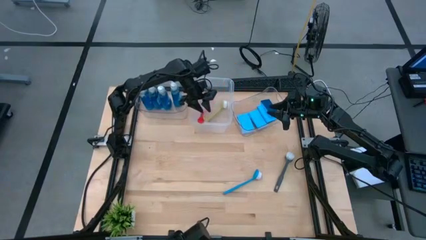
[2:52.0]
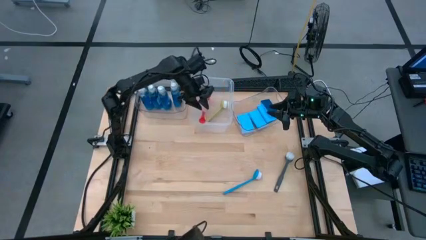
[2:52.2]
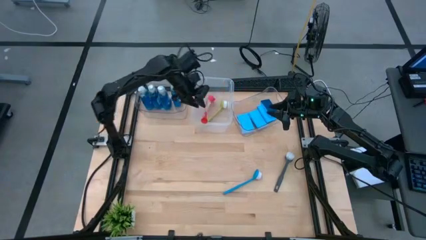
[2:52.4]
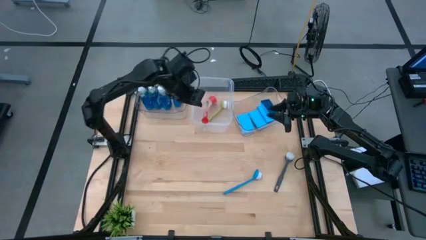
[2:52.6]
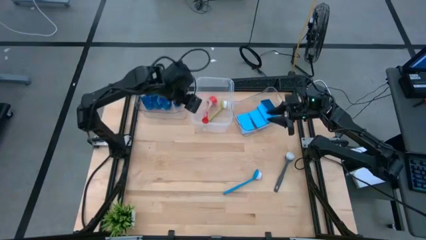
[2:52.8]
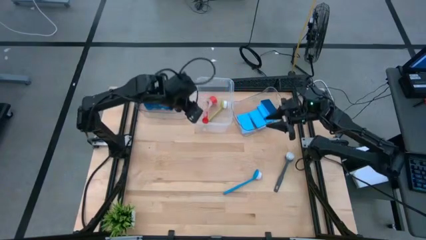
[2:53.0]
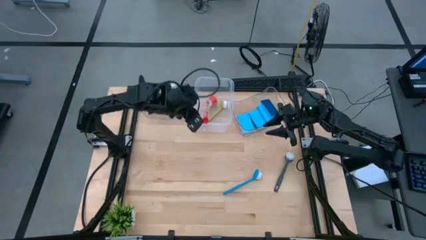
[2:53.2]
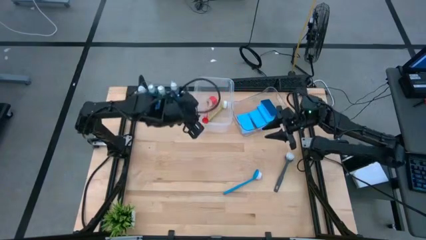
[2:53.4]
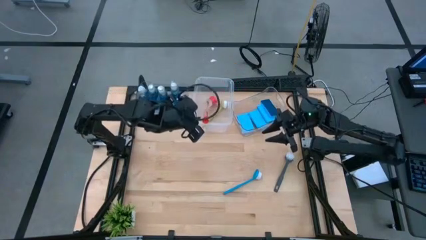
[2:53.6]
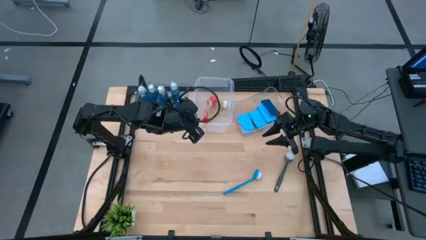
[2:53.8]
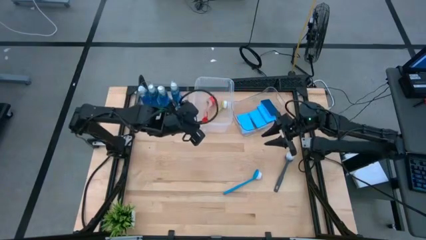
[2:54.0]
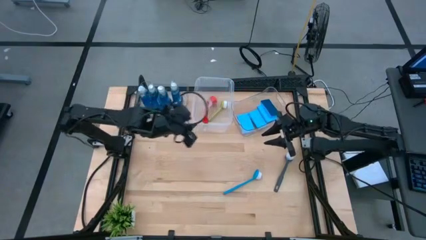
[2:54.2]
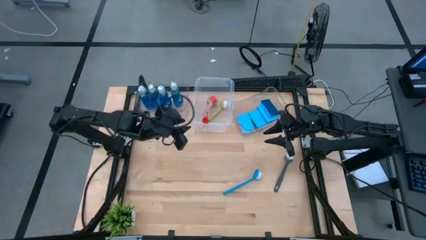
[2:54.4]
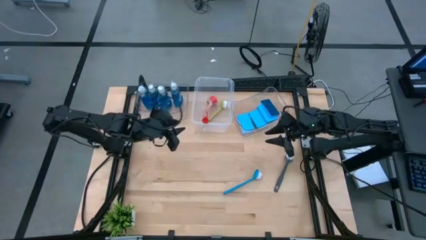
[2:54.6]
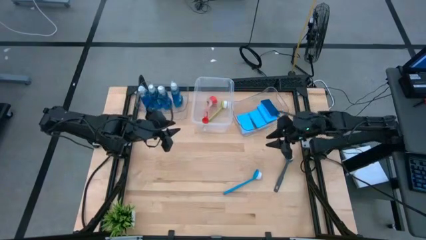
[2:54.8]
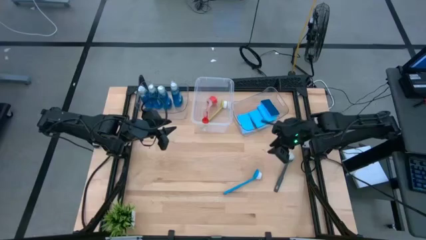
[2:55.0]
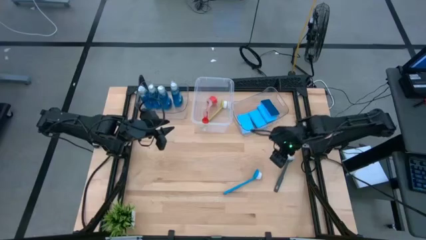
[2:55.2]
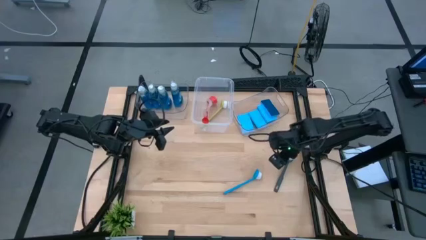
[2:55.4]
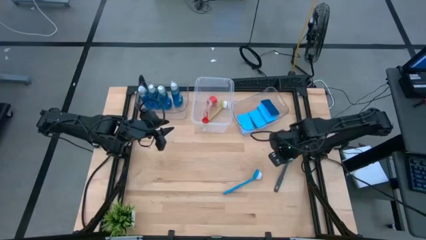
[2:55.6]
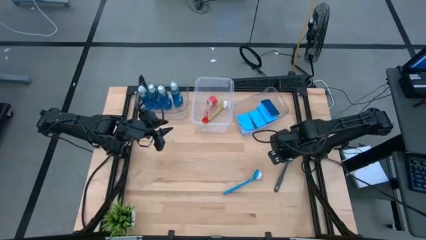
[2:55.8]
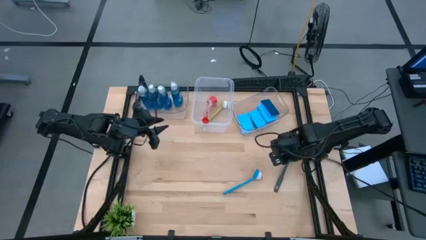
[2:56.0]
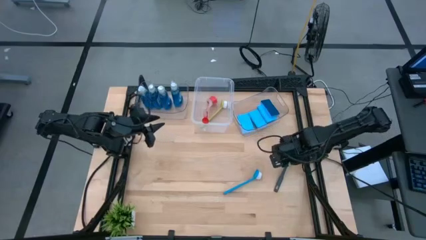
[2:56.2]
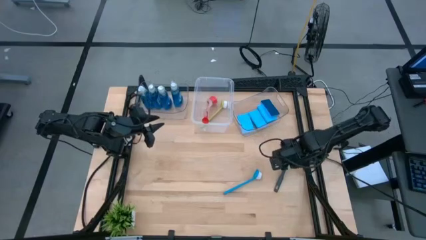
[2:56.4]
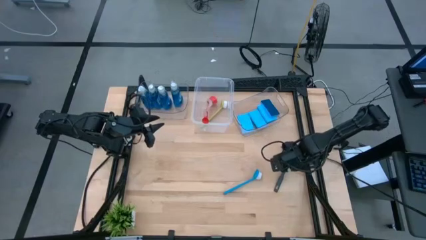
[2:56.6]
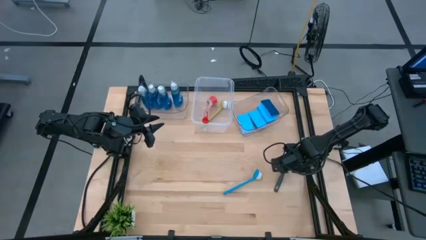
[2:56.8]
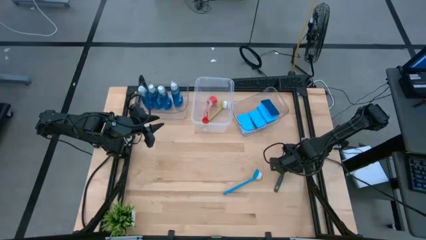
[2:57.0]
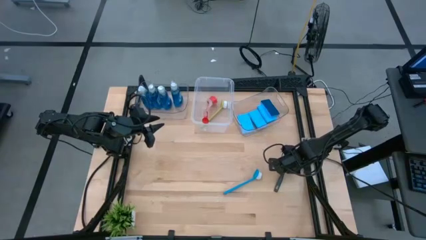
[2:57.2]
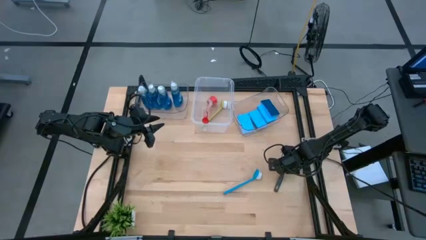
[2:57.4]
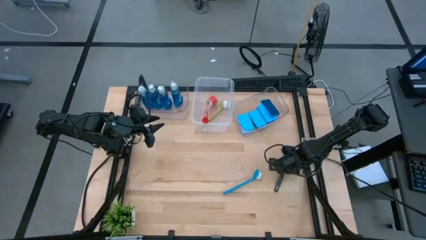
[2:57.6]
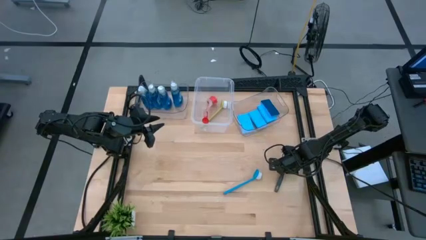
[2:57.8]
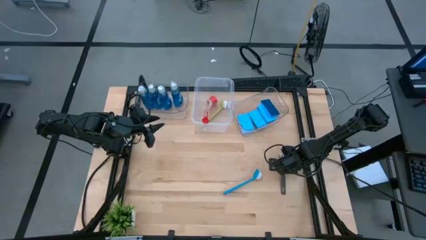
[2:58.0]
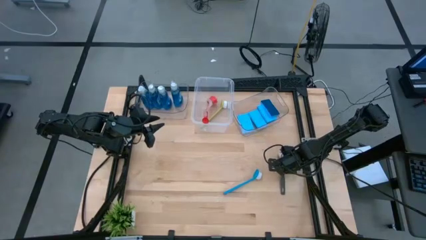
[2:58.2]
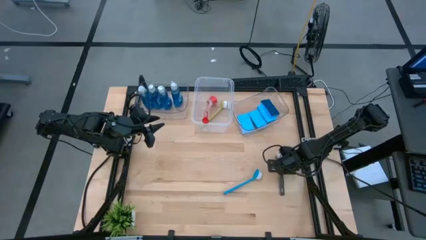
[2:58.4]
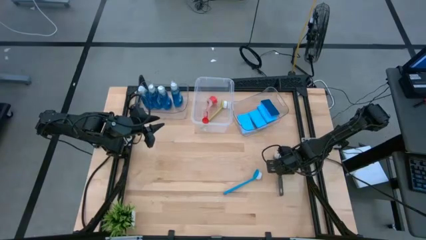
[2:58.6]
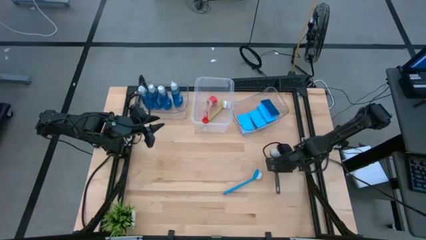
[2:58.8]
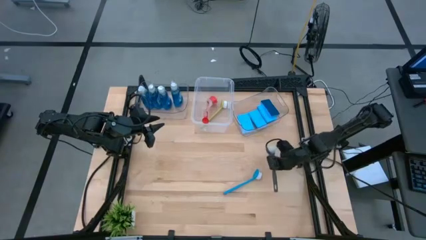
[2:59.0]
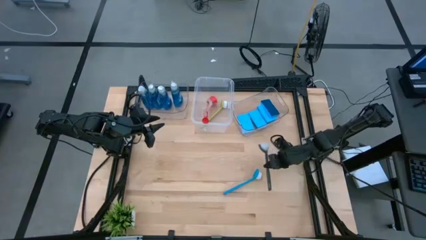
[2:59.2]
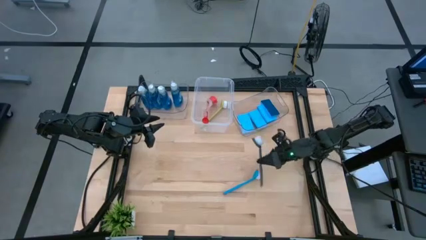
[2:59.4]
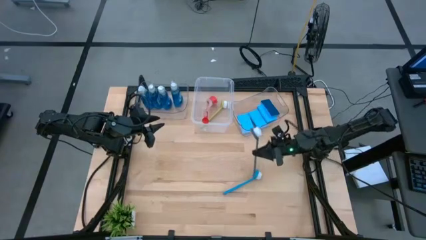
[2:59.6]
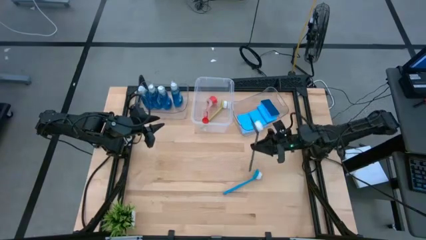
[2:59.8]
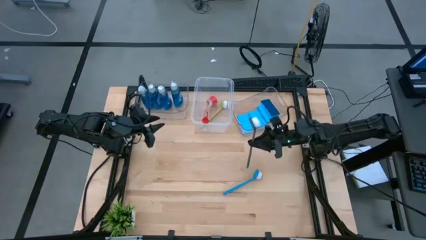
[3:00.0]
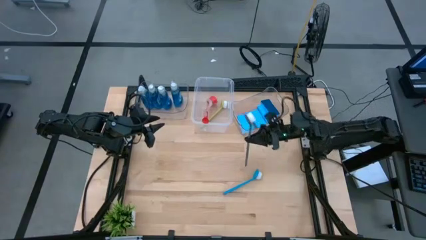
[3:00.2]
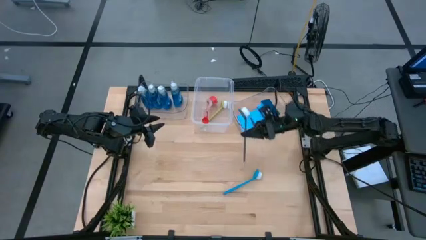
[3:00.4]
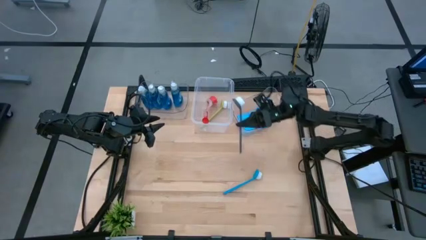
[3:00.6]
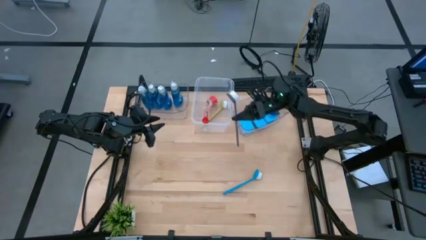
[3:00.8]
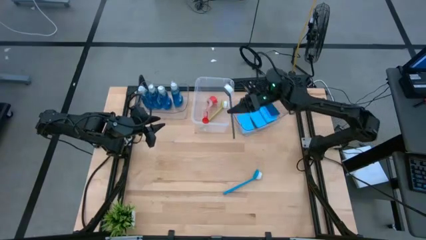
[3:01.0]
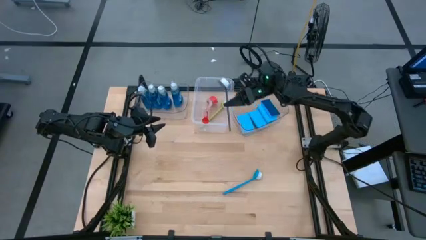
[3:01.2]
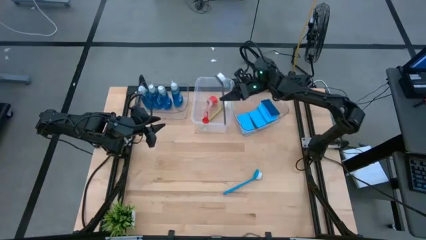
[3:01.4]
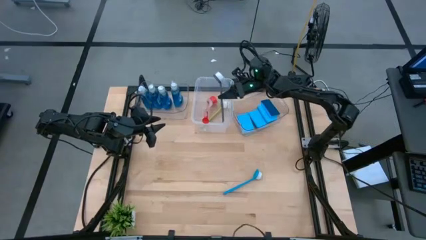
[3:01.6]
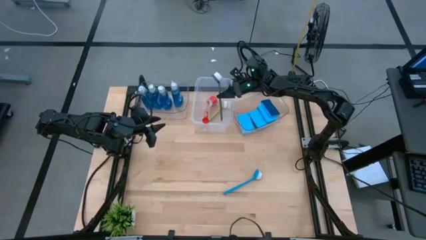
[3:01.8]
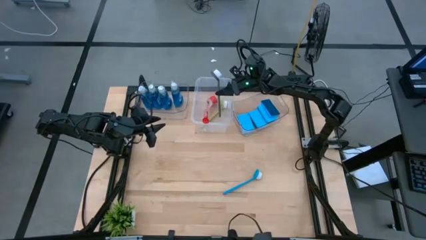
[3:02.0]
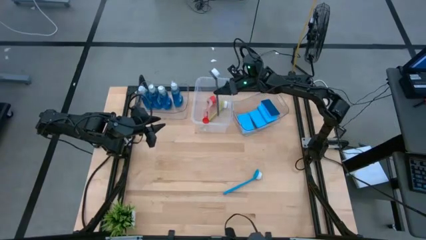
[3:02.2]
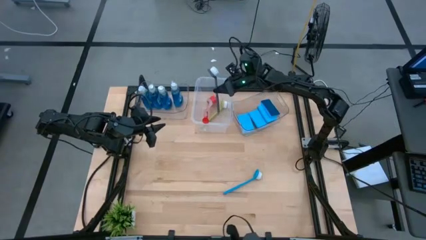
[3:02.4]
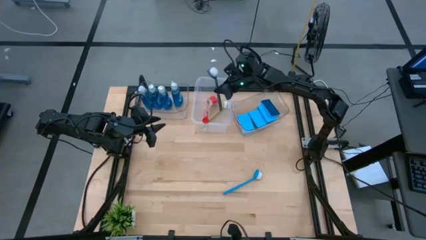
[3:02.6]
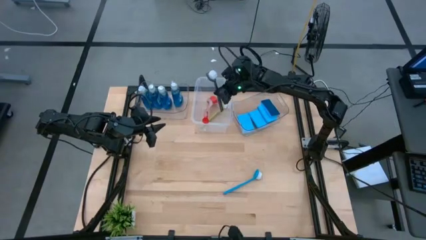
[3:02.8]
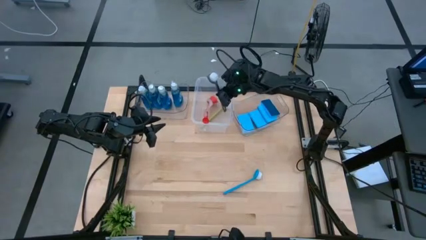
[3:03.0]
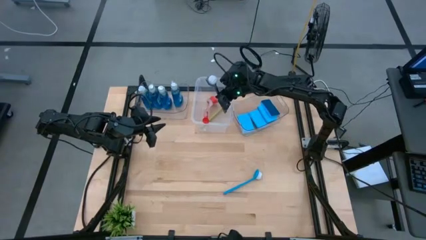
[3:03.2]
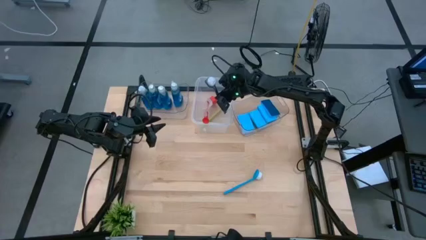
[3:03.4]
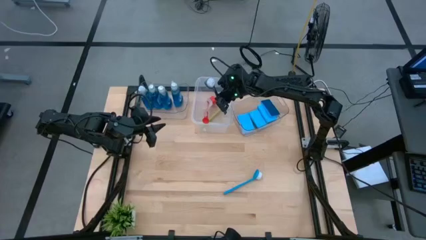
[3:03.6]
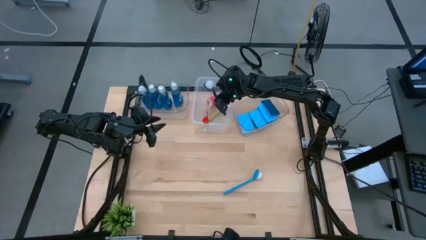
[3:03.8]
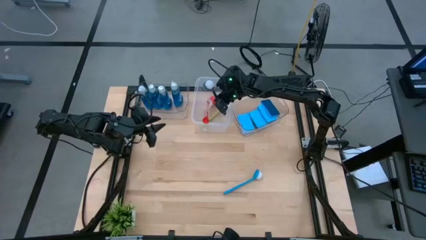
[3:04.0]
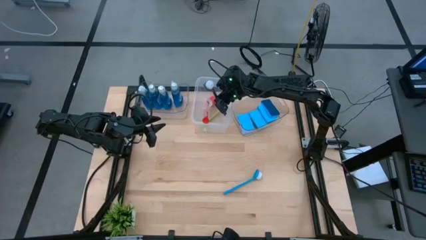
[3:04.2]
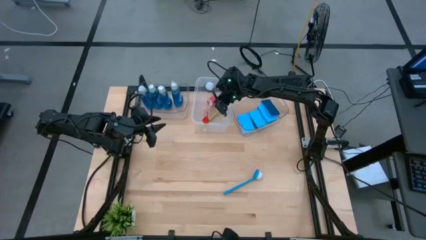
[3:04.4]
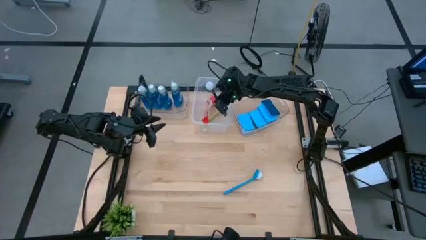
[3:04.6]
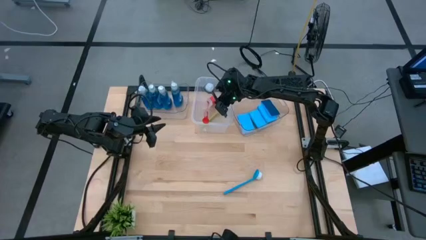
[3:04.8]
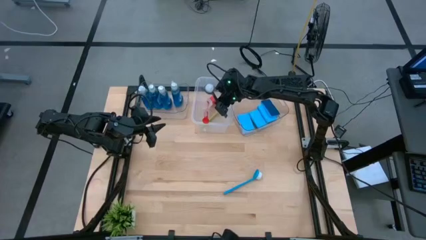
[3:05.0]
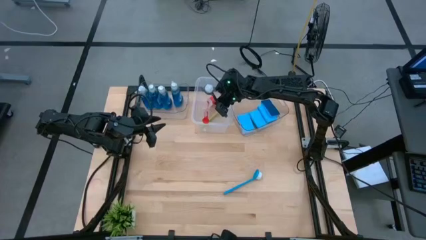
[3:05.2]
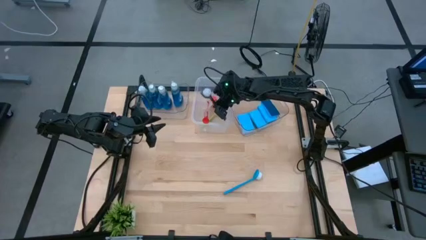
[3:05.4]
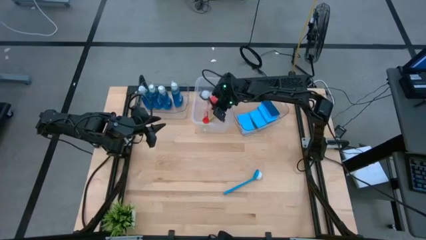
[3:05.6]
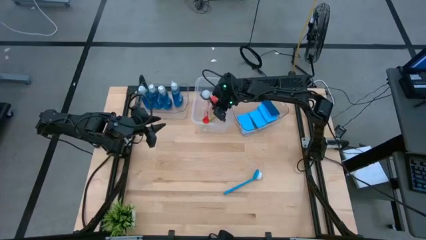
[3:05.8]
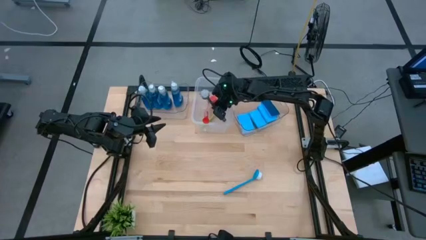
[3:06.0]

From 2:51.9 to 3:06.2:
Task: Pick & Place Kitchen Sink Supplies
Put the gray dish brush into the large transparent bin

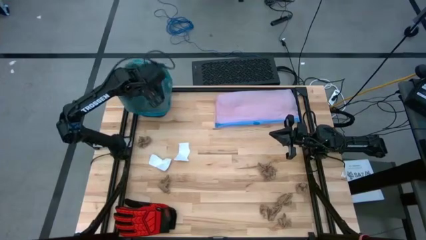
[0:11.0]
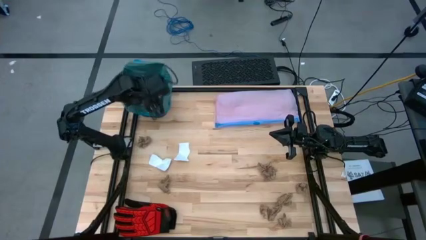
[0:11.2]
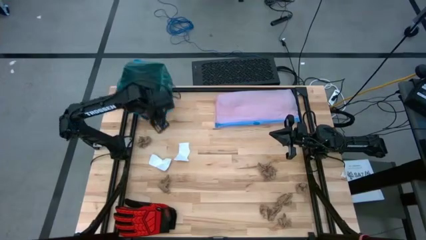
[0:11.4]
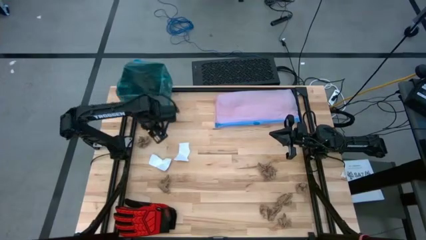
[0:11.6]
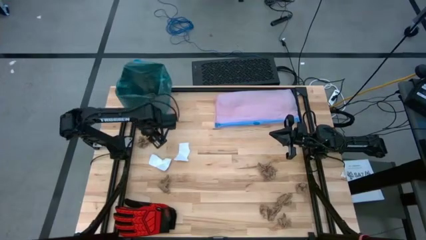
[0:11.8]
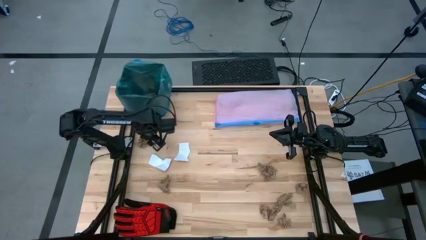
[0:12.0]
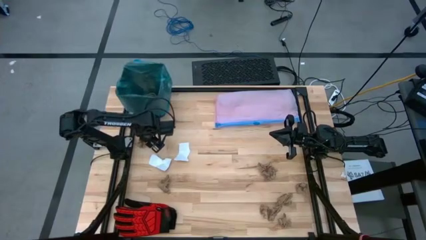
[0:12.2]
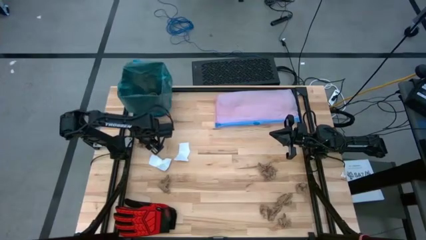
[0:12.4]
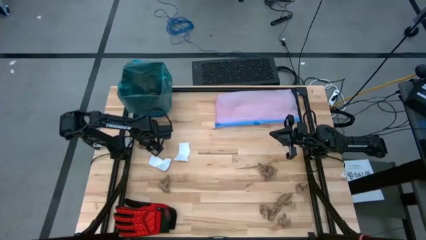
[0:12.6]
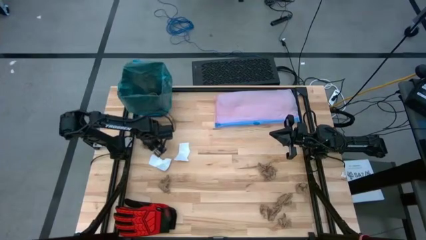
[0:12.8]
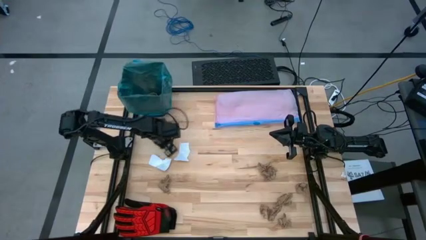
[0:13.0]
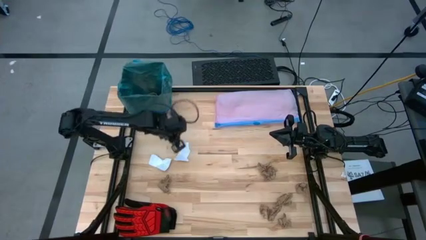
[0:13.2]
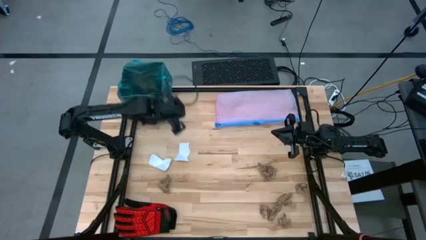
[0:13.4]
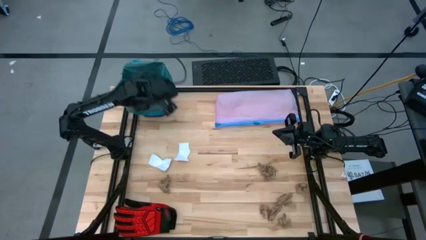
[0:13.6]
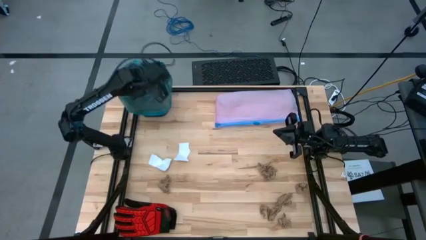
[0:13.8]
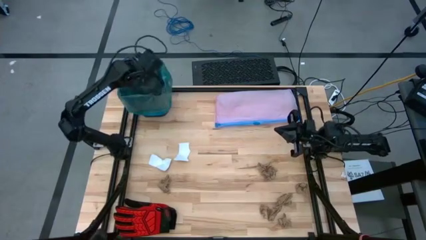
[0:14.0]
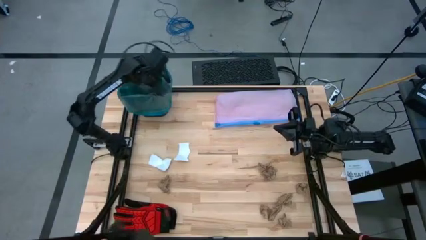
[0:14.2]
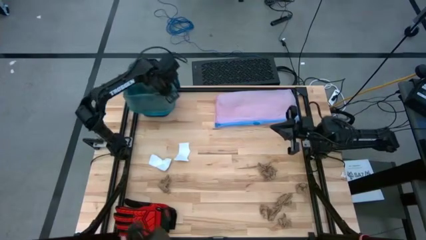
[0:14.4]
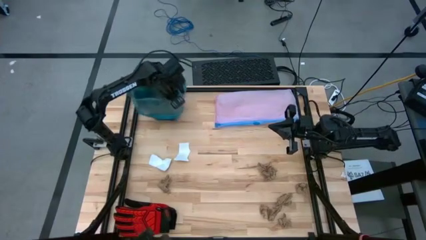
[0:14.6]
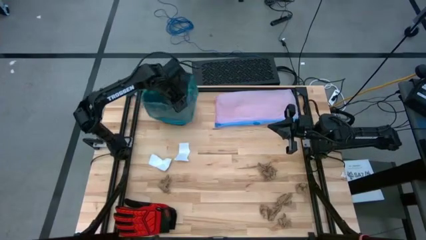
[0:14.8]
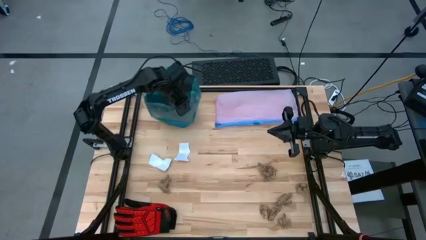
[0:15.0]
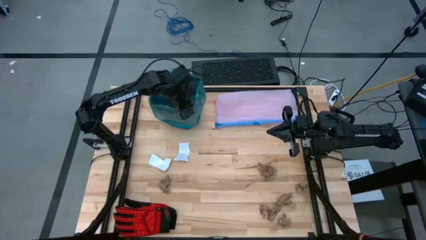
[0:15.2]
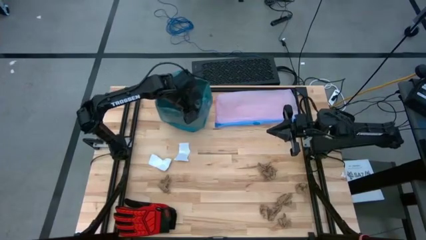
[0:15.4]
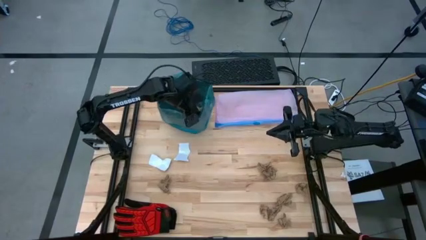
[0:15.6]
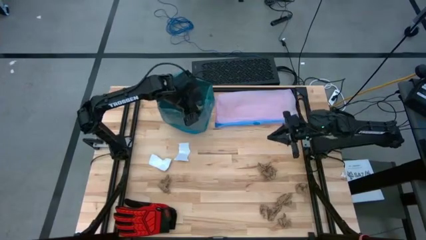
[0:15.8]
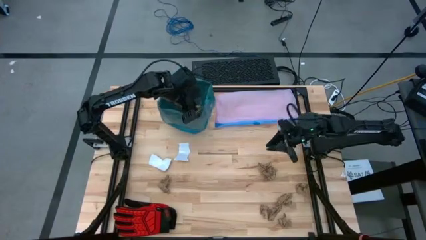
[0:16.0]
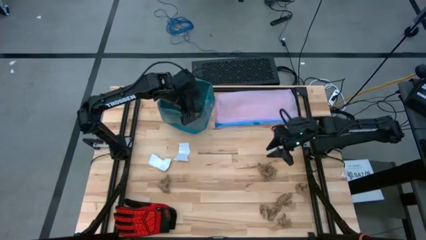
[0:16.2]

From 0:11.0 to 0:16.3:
Task: place trash/remove bag and relplace
Put the brown napkin into the trash bin
